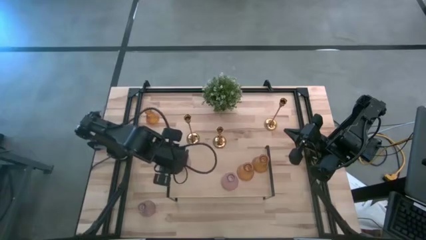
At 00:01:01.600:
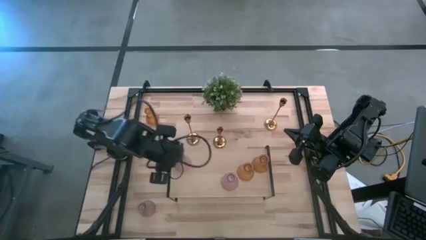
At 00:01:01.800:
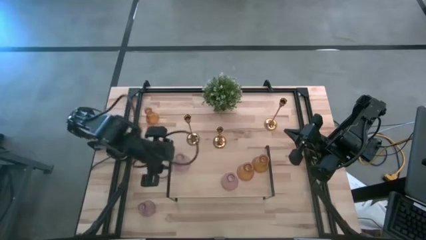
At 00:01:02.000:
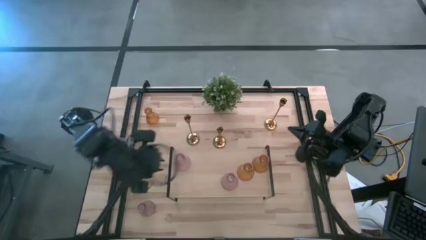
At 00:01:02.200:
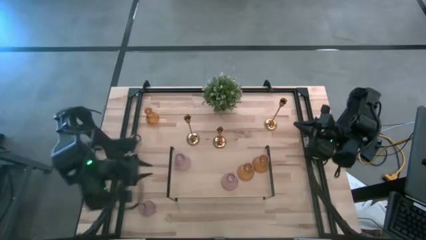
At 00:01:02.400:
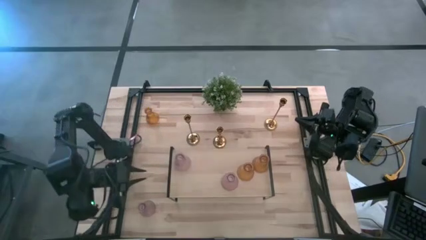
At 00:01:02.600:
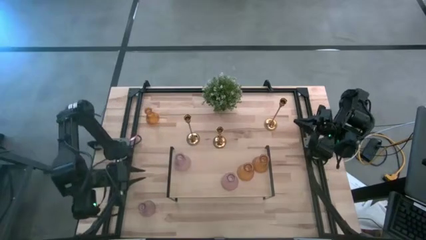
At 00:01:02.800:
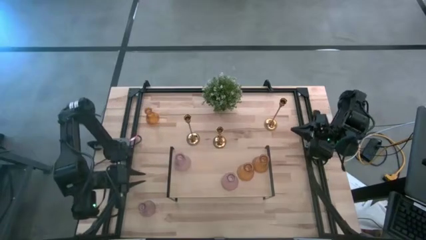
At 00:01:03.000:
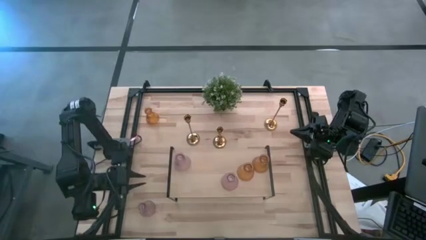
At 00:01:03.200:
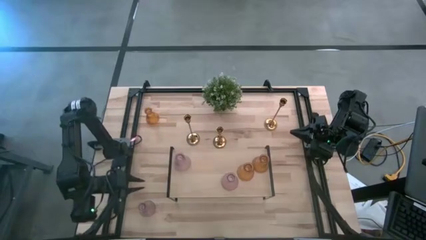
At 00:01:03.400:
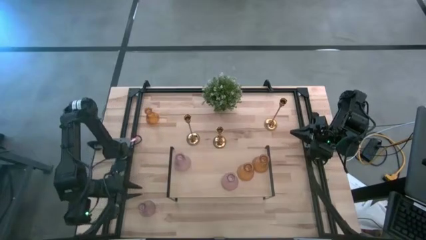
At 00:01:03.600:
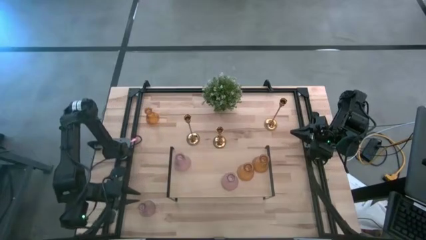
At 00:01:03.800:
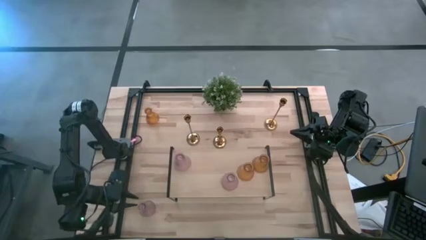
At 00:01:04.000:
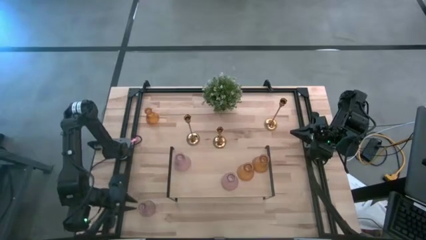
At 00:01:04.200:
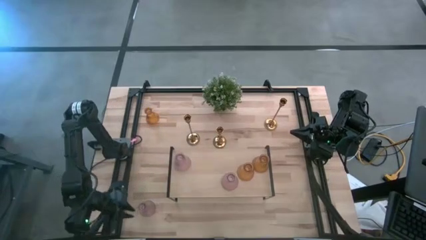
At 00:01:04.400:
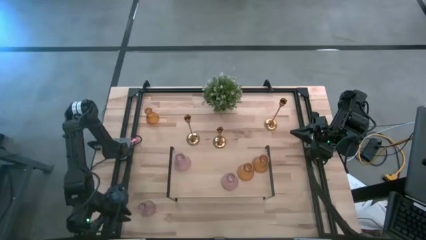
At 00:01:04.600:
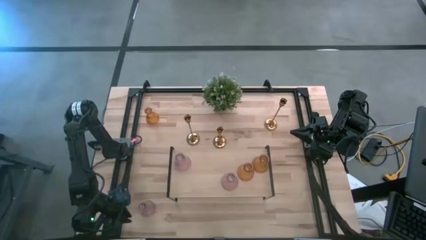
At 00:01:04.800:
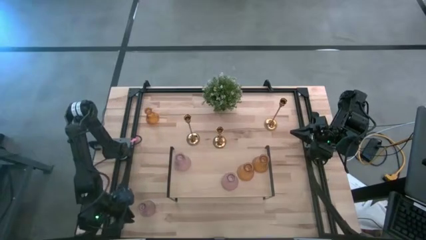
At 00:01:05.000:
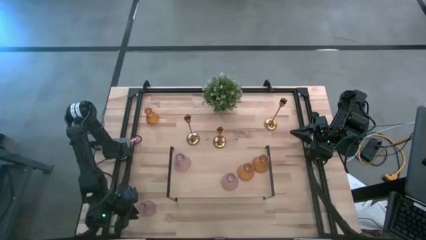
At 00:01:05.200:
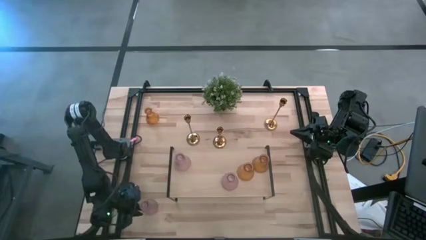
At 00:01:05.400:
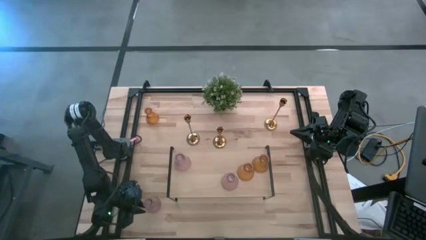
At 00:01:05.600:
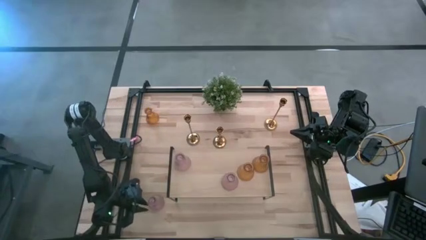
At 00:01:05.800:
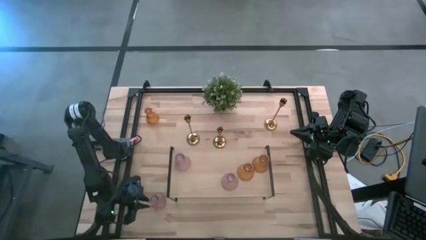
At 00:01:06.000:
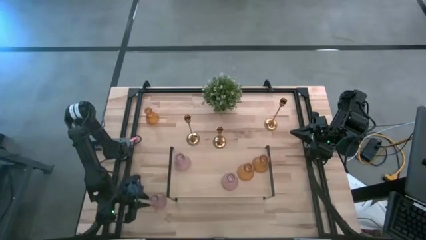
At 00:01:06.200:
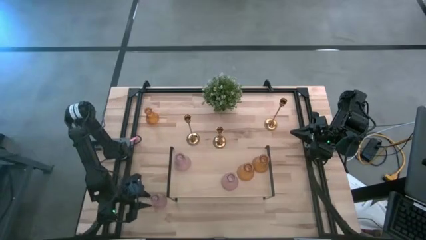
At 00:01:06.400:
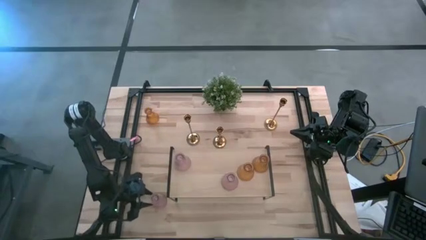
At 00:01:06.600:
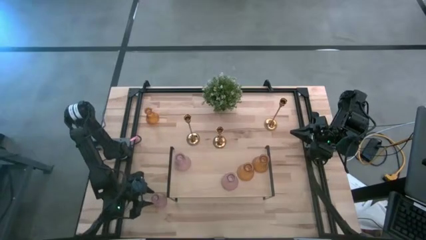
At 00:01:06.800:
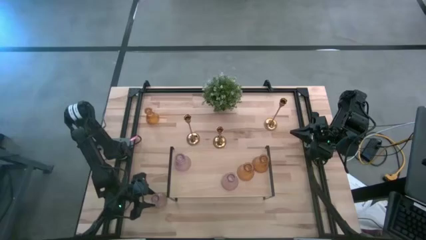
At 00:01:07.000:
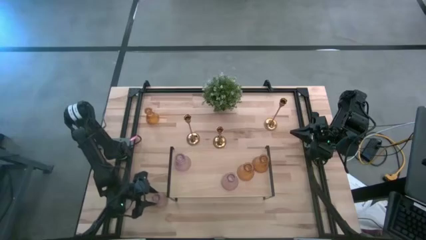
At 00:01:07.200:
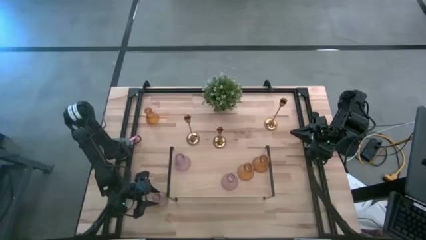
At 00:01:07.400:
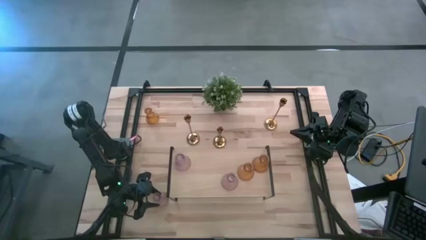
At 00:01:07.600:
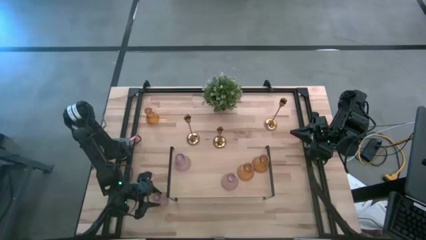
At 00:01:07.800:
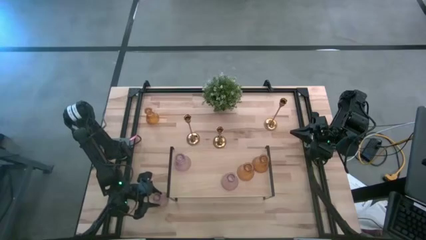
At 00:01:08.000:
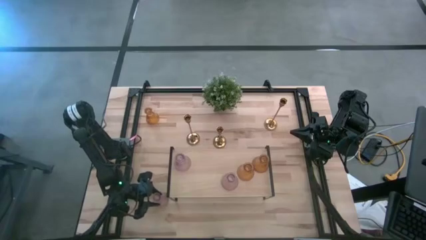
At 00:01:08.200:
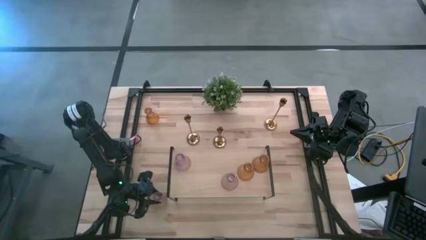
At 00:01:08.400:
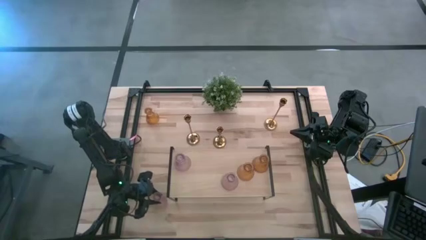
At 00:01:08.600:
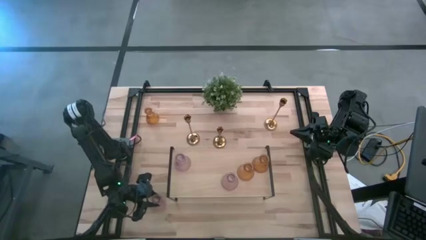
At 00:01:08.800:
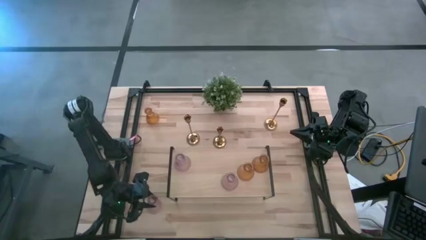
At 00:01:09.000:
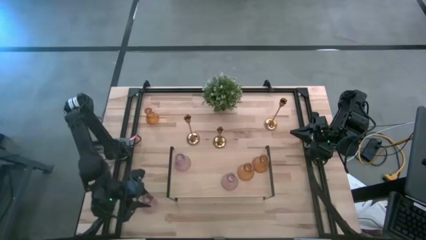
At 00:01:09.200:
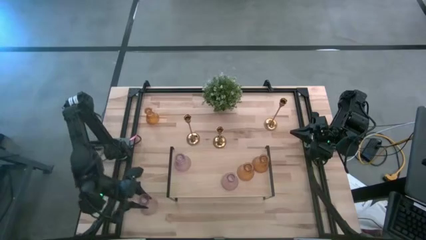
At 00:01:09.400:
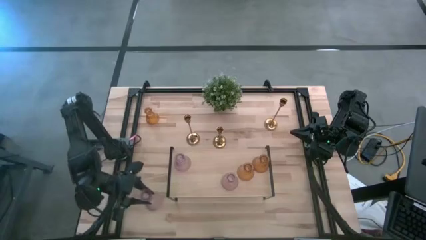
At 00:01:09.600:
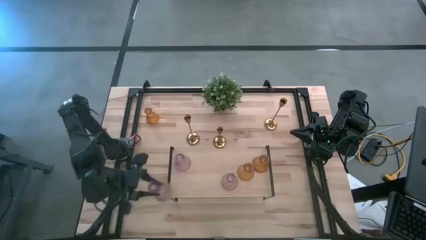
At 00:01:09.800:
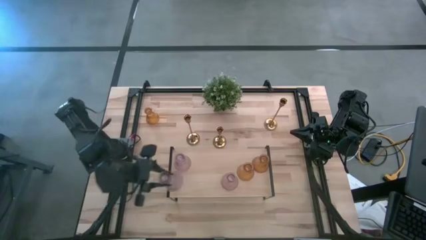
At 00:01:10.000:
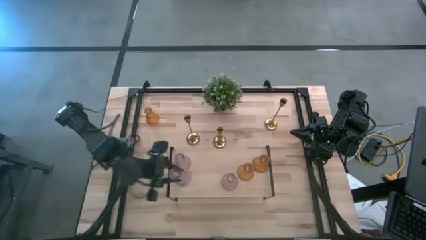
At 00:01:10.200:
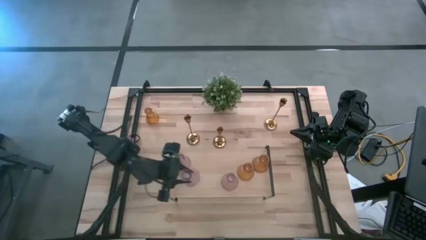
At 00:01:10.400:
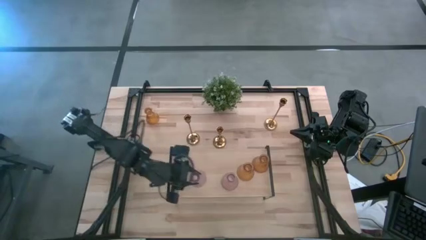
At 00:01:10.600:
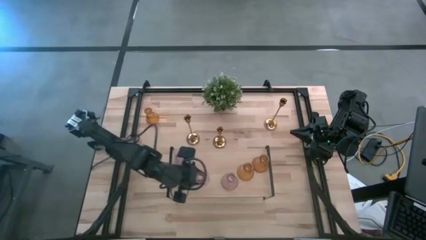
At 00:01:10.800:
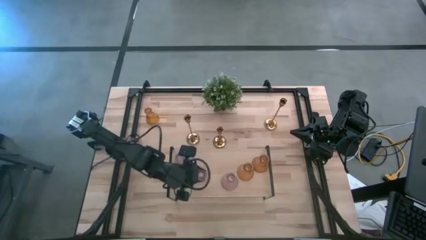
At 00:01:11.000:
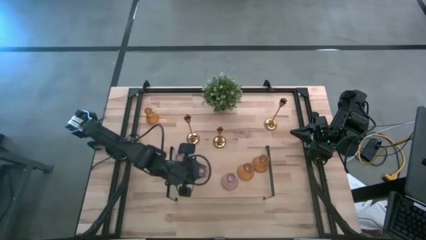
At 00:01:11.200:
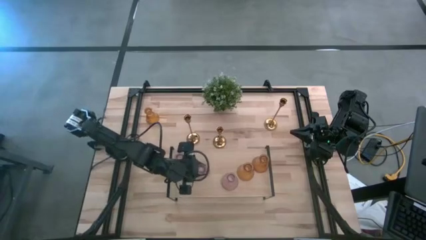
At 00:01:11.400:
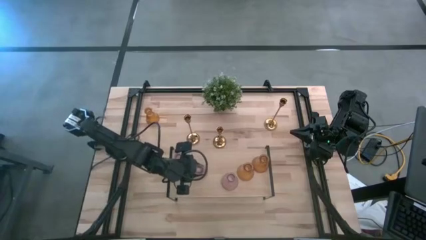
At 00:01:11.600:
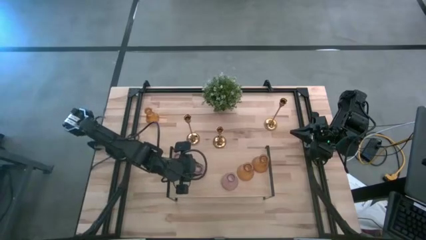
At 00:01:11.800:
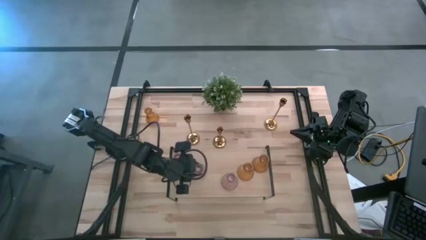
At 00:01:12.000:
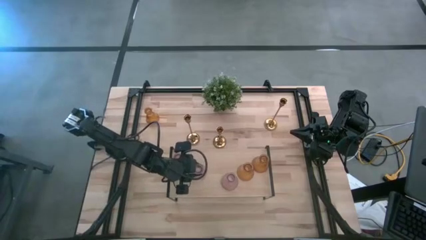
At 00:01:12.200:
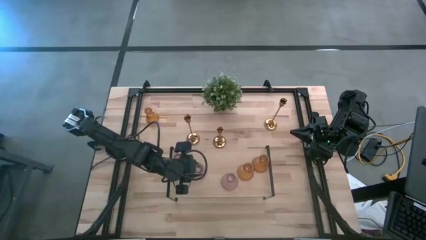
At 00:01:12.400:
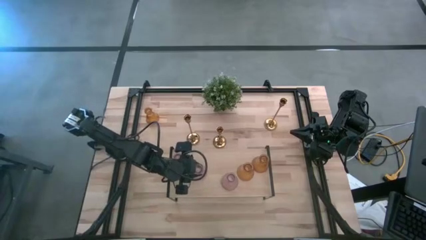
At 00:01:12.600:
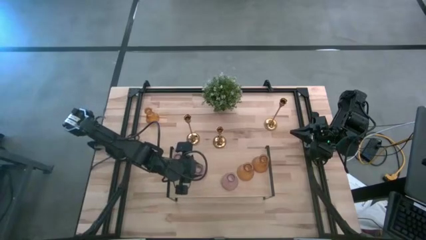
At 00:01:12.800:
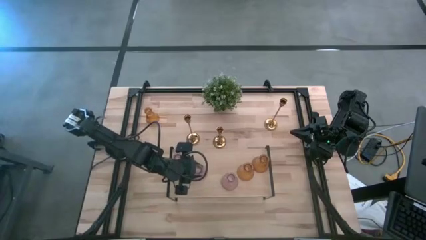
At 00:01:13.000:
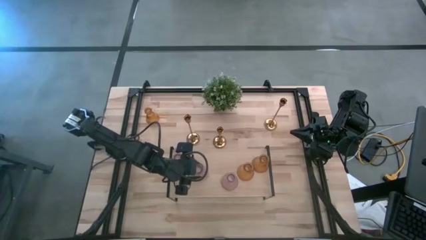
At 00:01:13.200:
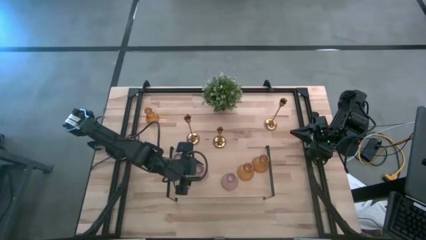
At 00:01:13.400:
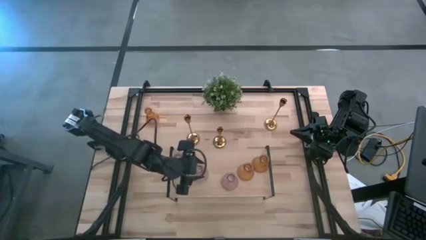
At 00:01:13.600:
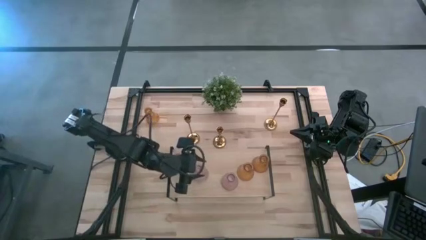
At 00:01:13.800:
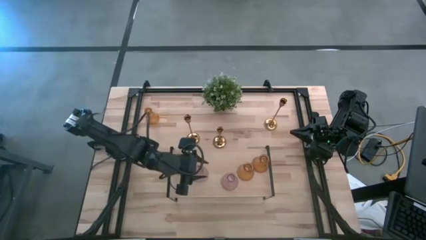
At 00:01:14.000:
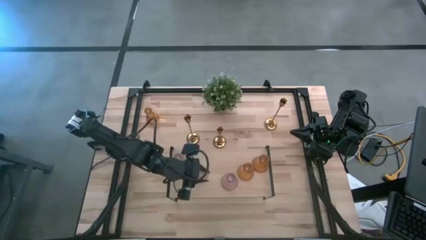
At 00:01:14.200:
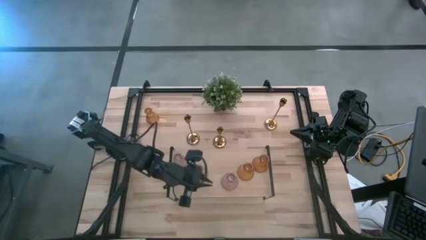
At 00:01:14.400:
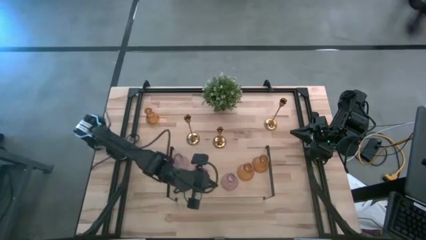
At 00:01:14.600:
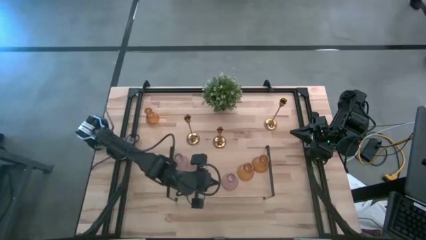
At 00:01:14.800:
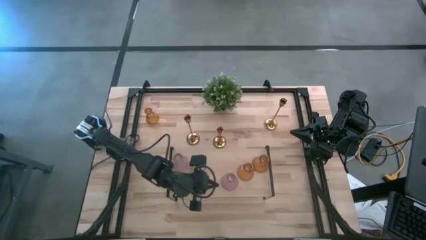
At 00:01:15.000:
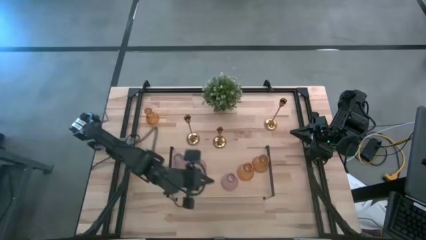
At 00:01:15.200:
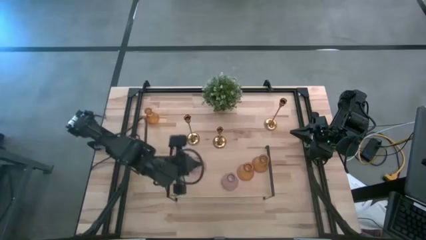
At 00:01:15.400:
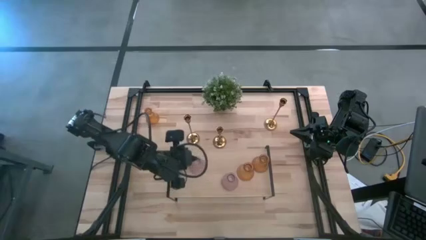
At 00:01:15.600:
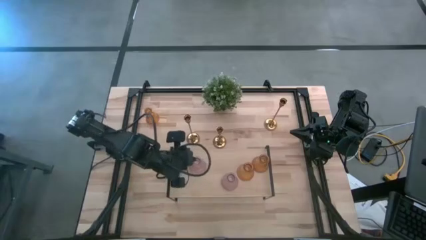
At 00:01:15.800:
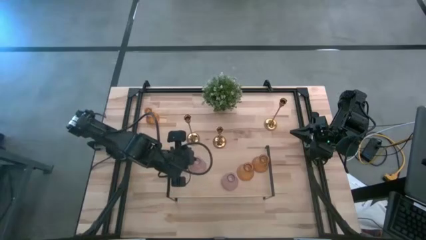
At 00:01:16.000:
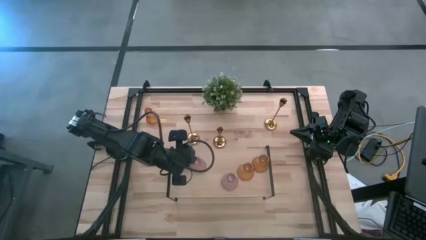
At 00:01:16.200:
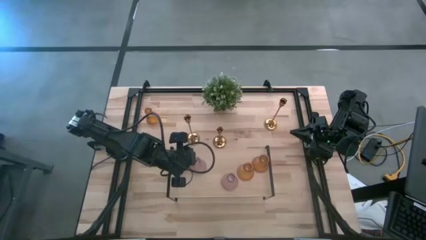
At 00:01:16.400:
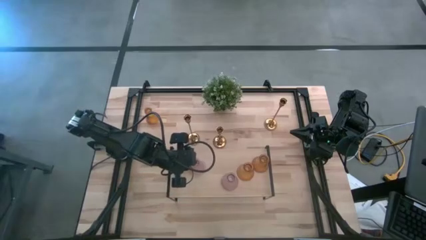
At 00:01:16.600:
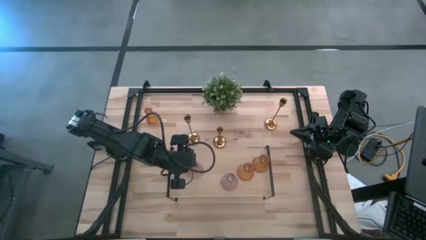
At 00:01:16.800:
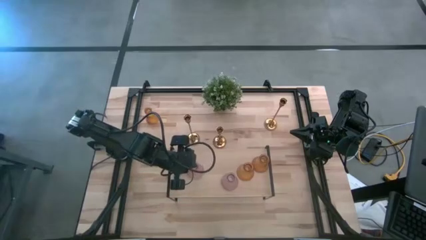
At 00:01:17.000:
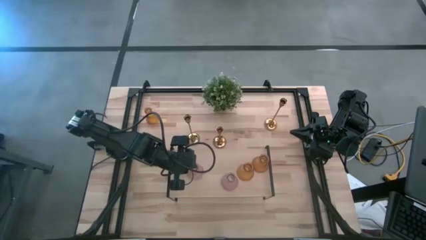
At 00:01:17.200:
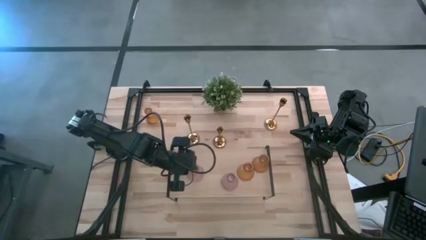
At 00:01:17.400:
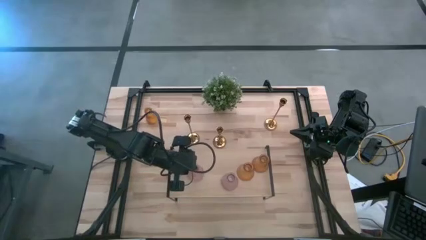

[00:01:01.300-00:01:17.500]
Task: Pick & Place candle stick holders
Put the violet candle holder on the shelf
